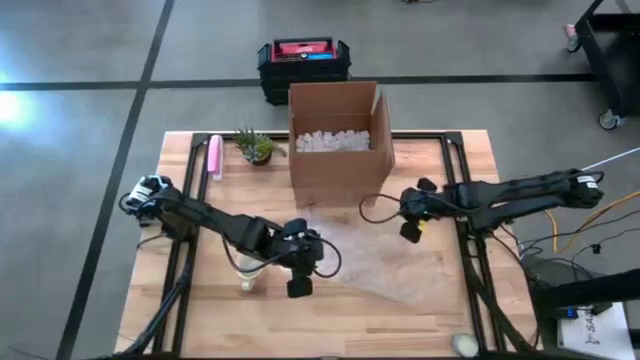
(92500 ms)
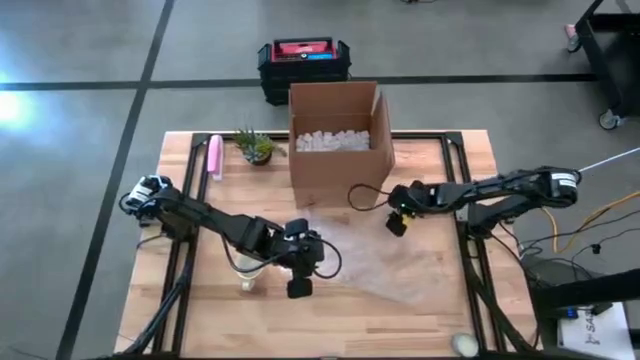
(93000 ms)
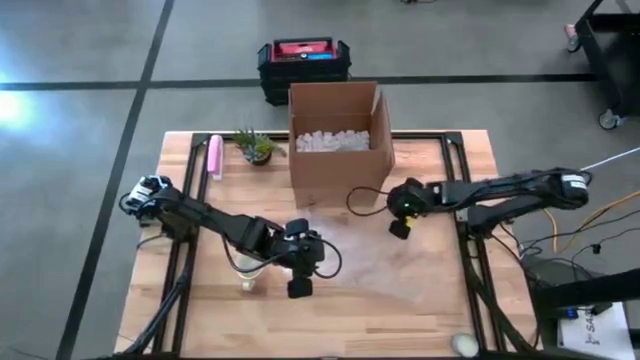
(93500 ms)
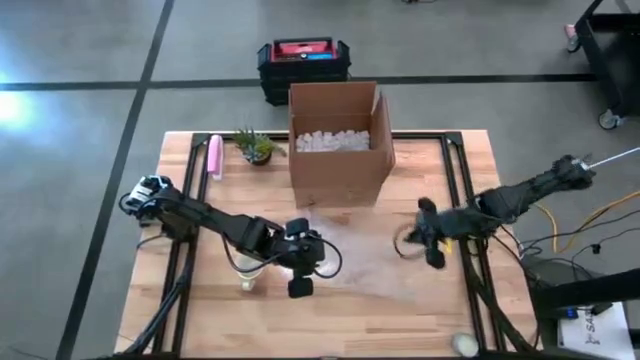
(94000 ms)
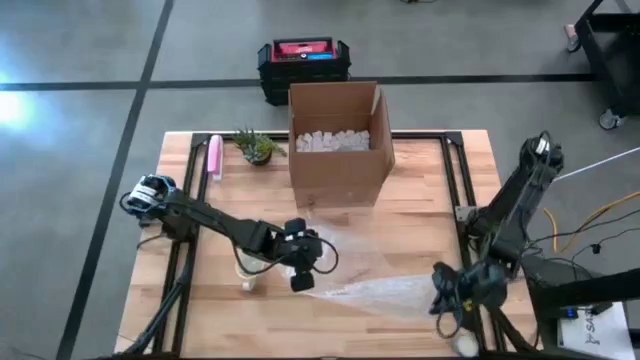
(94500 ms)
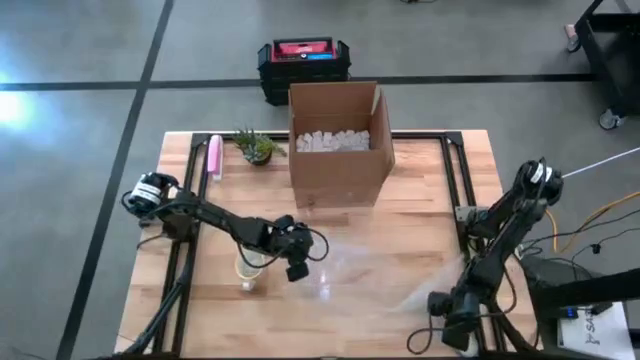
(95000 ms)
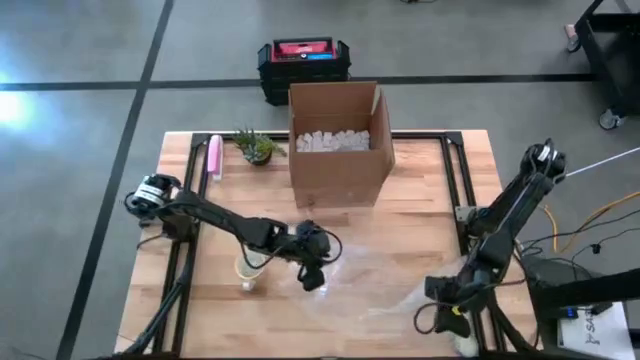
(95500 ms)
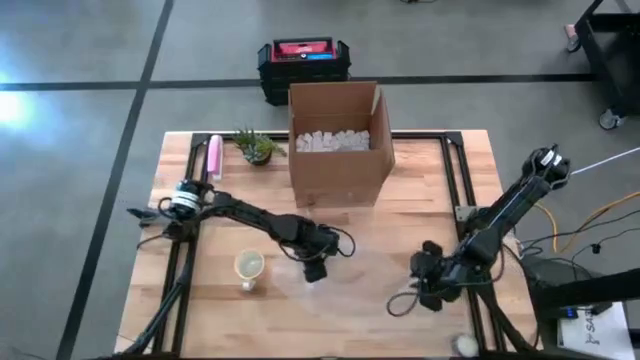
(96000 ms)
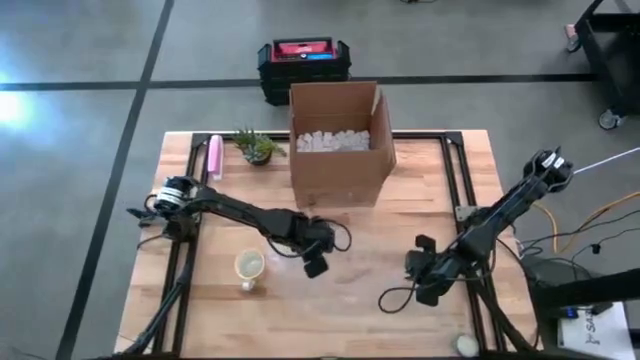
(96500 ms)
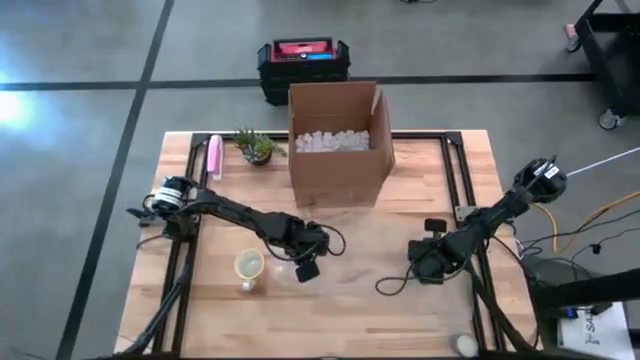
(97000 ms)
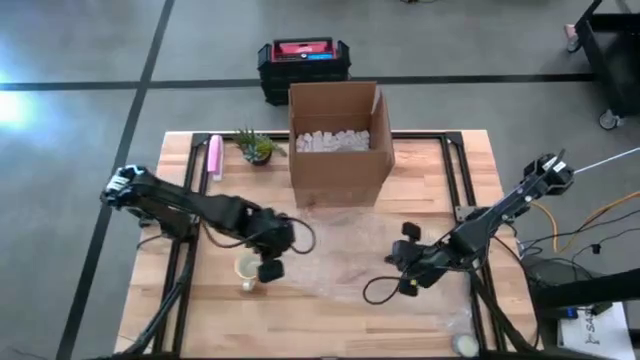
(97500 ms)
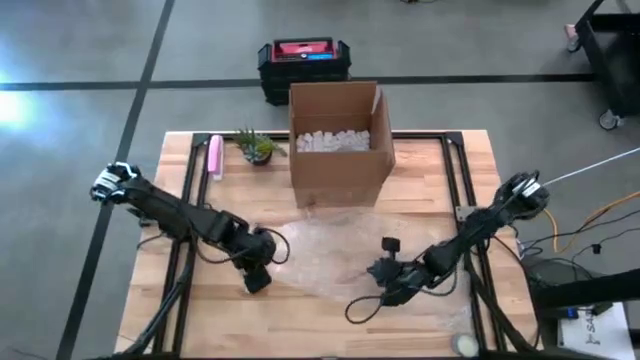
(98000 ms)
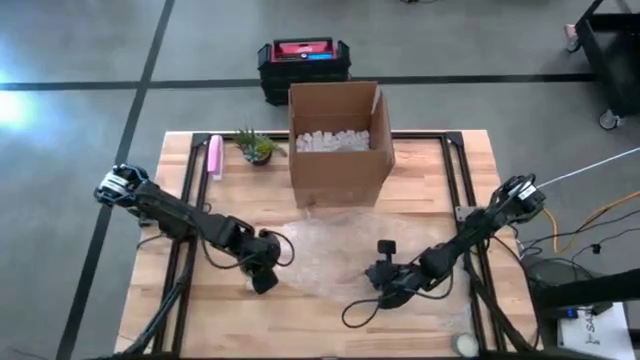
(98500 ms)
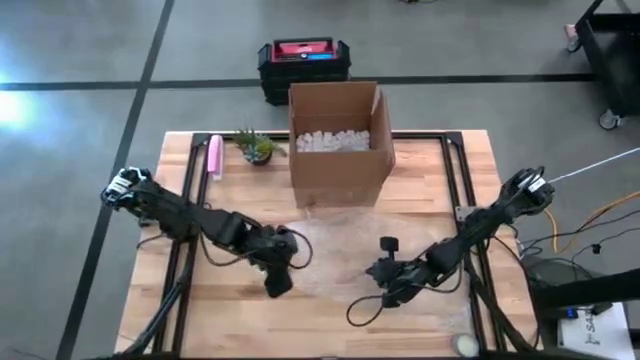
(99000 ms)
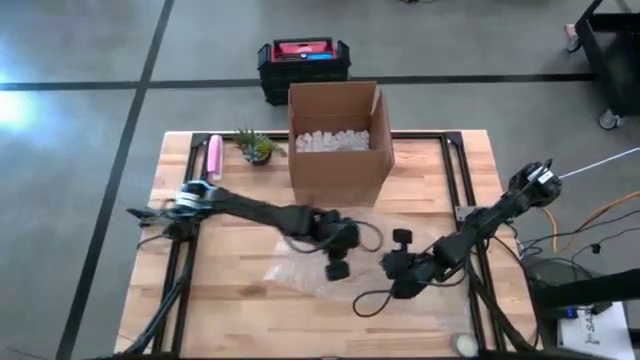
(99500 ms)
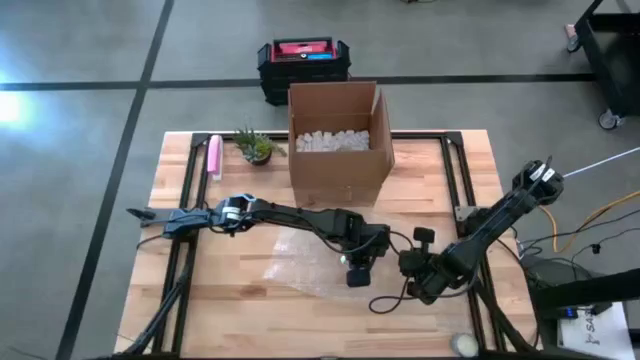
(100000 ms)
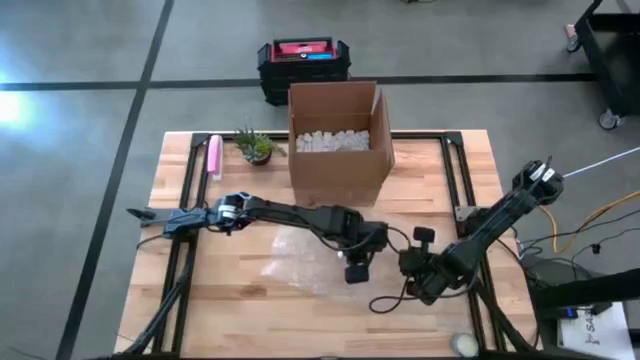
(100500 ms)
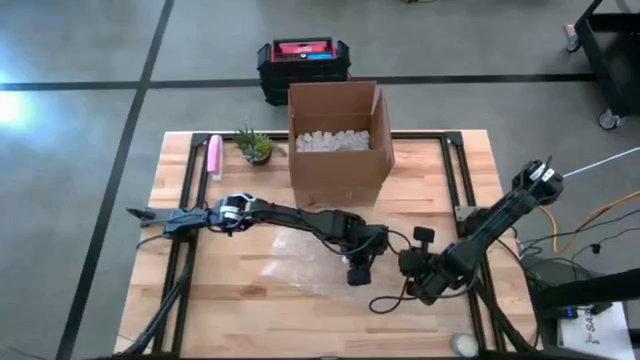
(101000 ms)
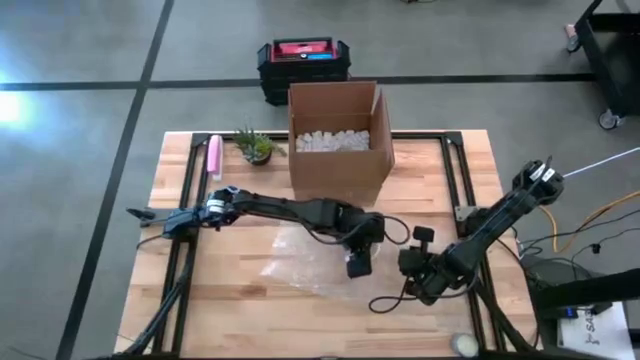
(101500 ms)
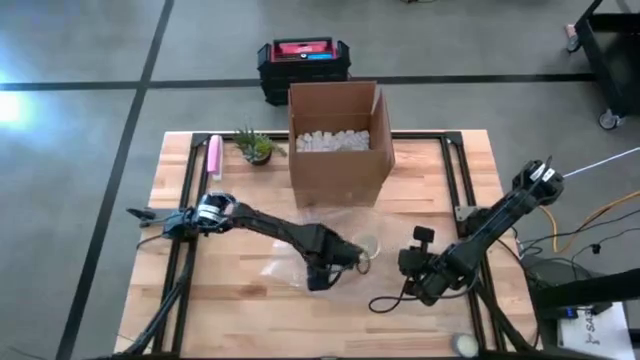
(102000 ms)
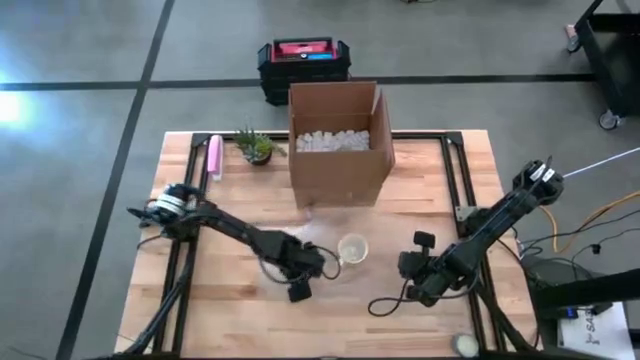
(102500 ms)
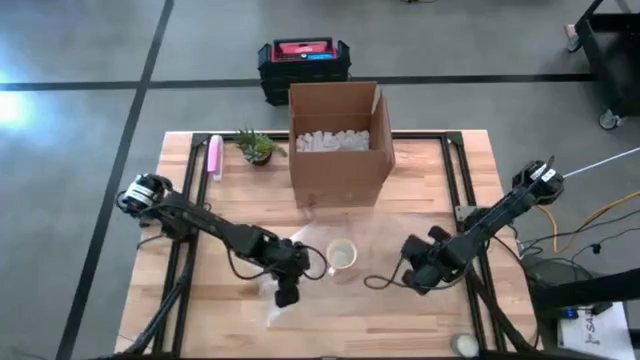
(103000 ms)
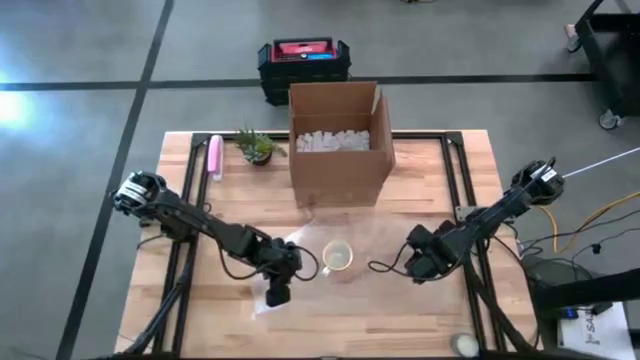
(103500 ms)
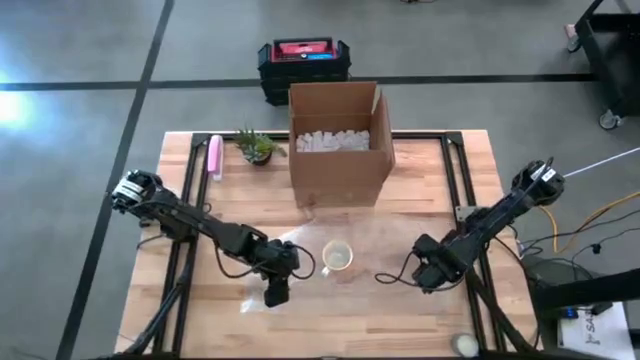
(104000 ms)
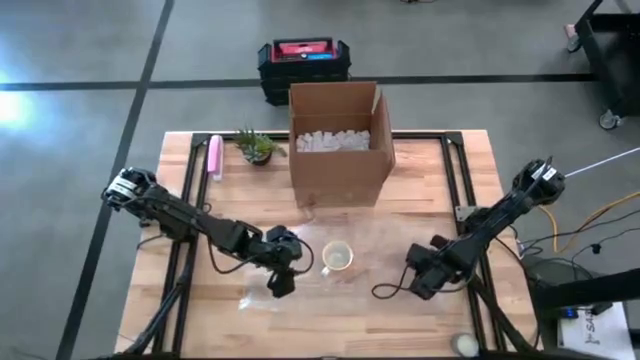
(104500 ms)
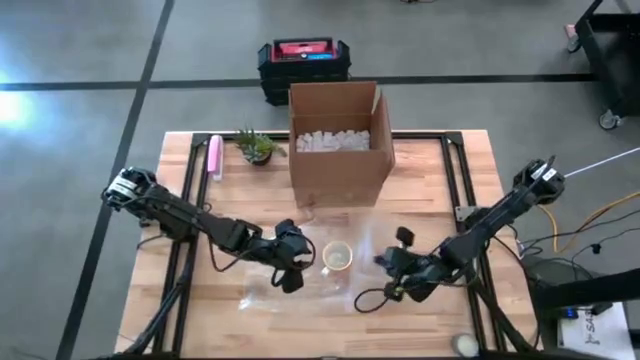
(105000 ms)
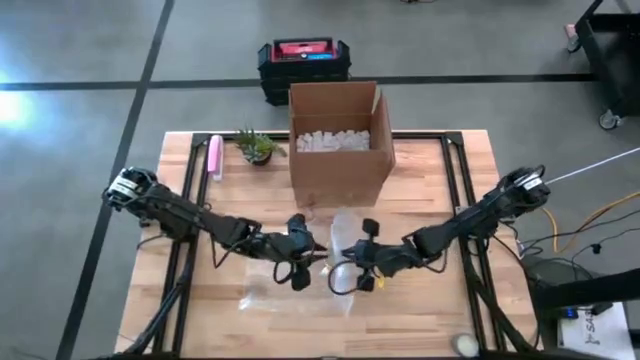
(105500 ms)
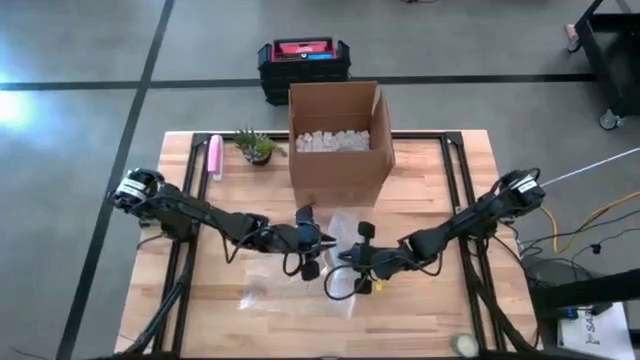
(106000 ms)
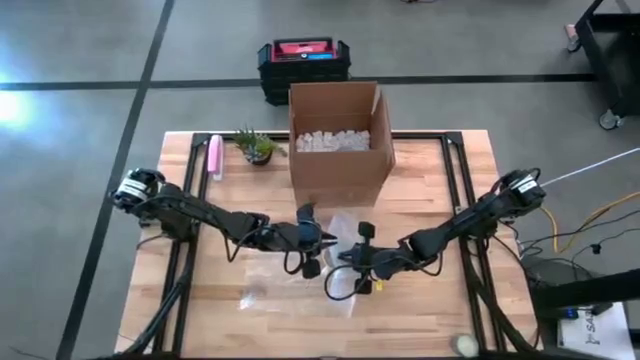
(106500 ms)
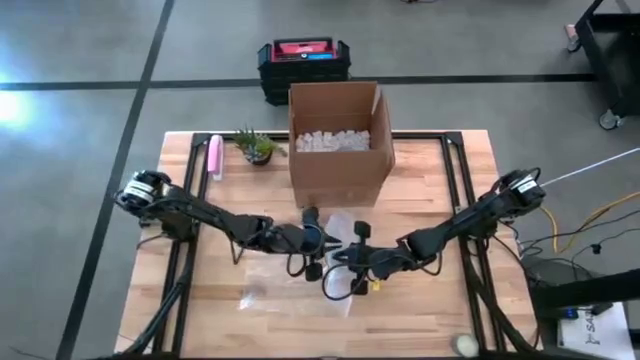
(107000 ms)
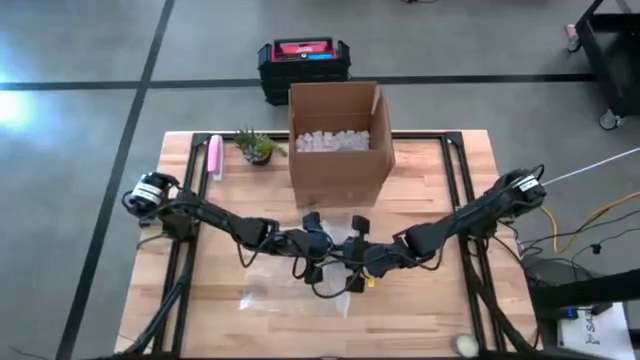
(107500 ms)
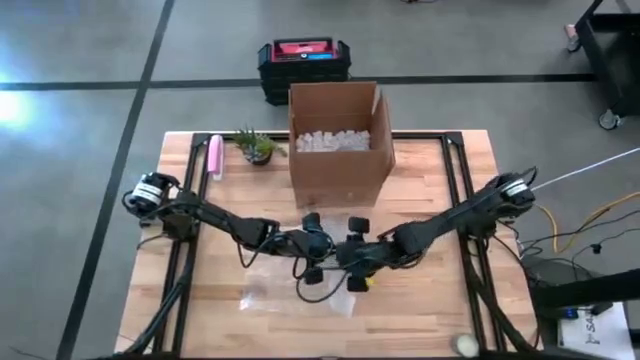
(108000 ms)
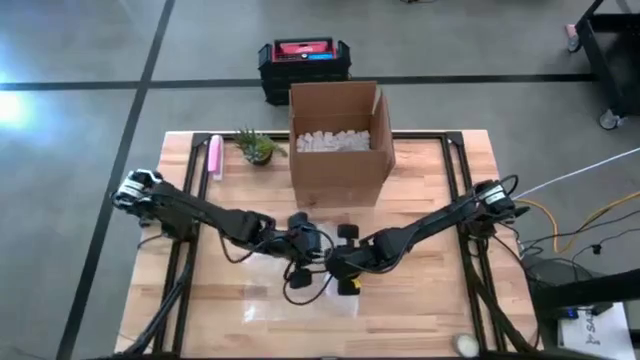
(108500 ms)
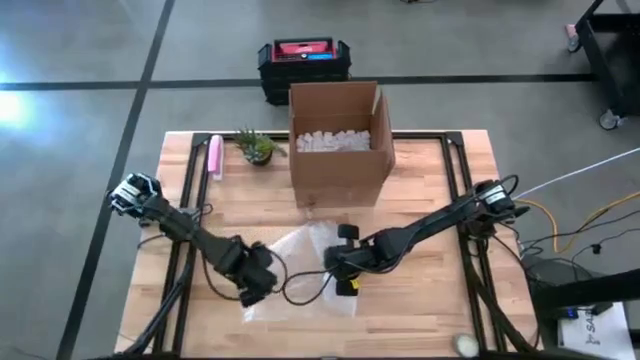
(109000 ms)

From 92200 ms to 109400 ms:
Task: wrap mug
Wrap the orange patterned mug using the bubble wrap

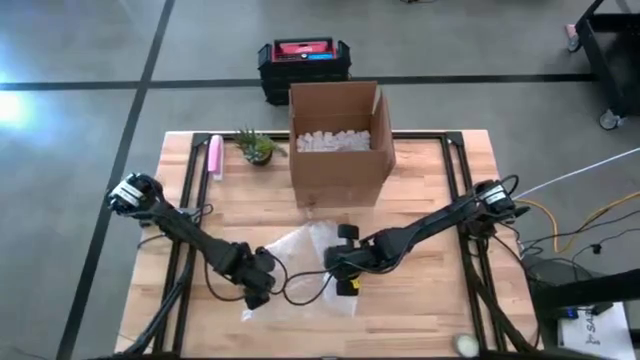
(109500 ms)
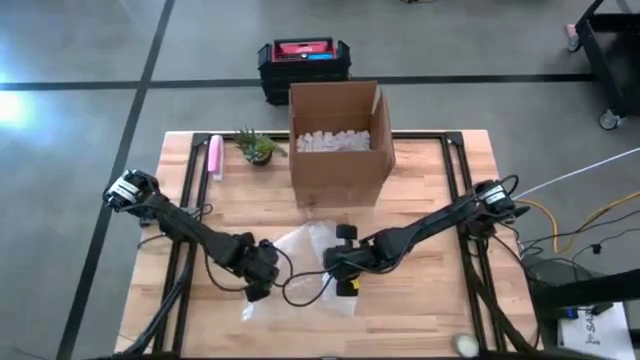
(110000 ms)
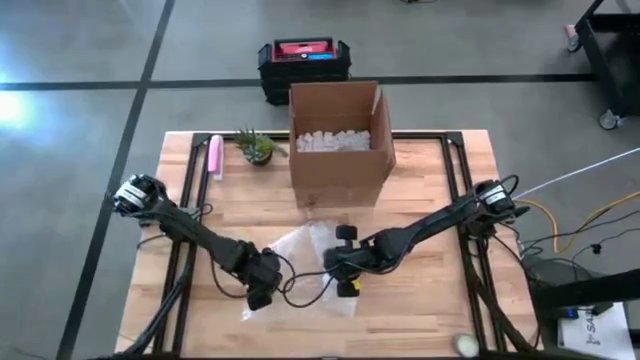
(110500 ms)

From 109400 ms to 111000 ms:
Wrap the orange patterned mug using the bubble wrap

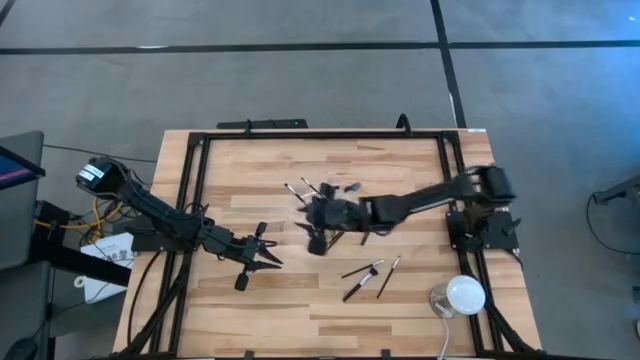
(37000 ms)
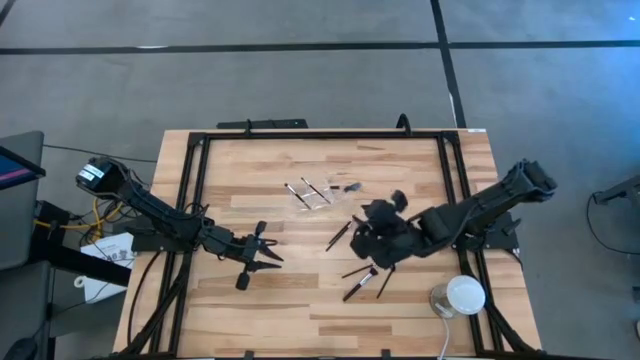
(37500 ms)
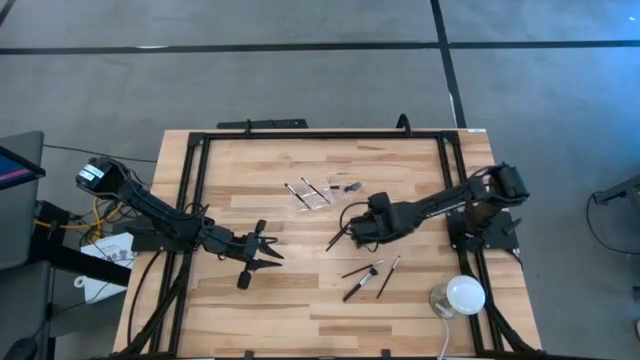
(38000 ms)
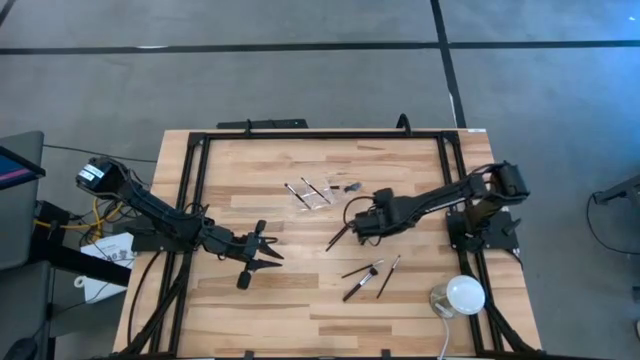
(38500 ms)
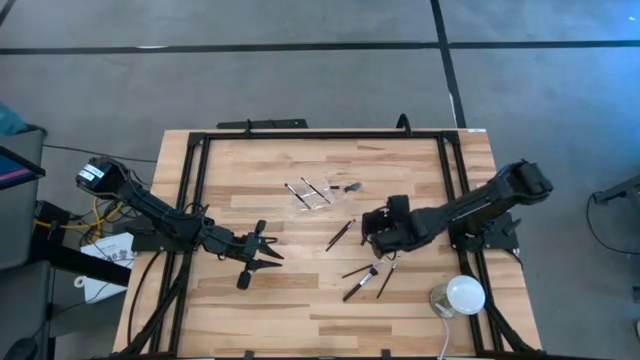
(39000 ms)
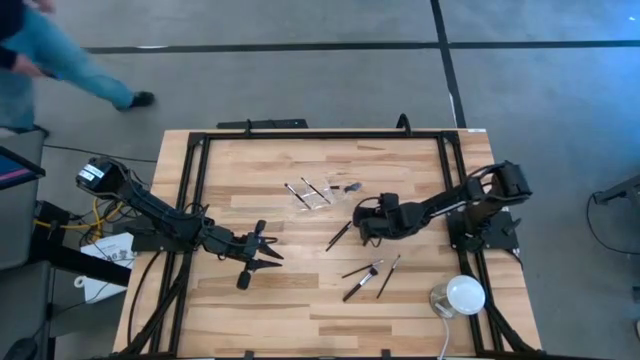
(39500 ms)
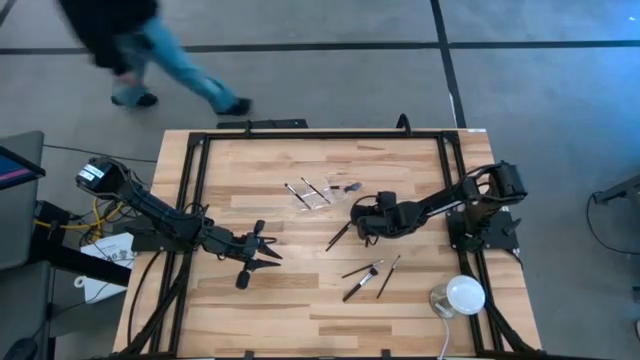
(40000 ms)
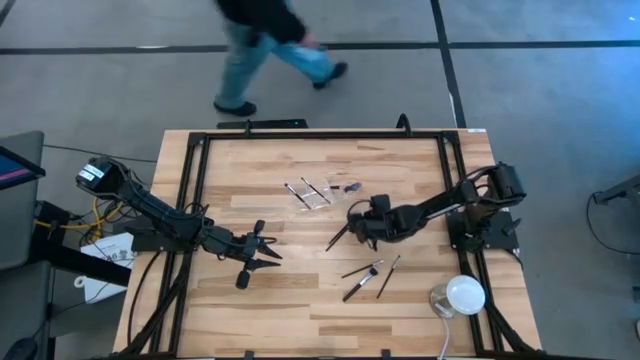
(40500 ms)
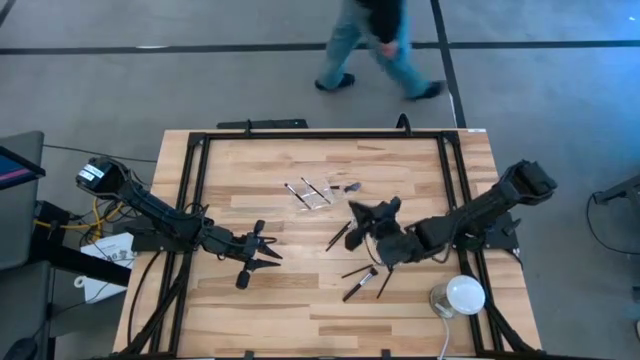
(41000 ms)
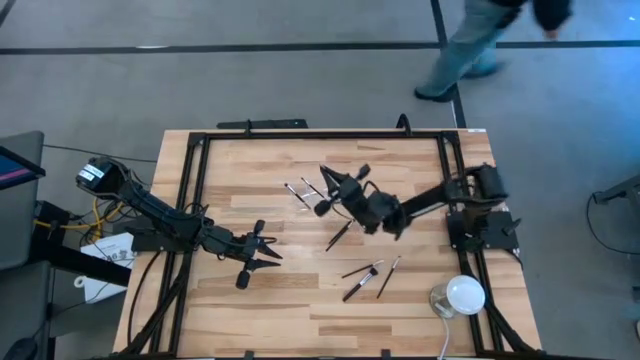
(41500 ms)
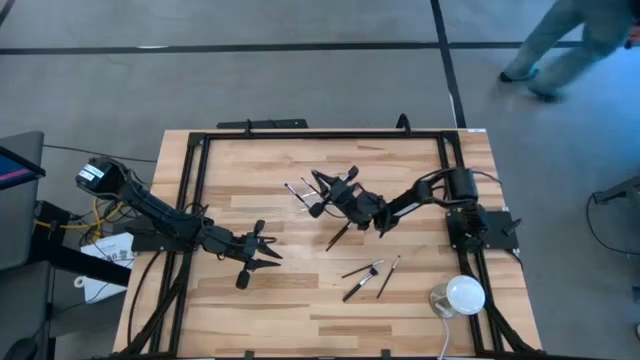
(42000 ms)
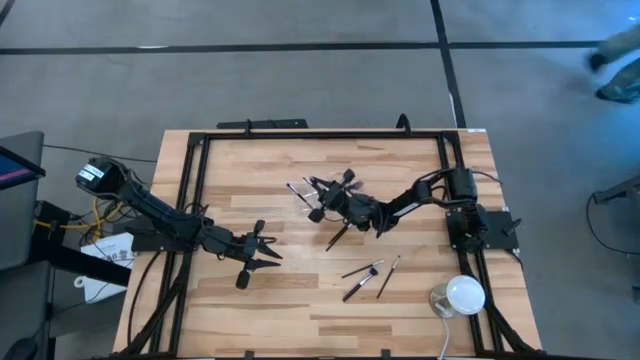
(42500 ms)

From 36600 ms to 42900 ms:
Task: Put items in baskets/containers
Put the blush brush into the transparent organizer
